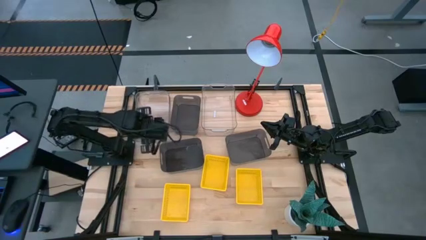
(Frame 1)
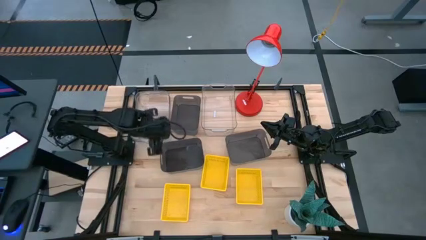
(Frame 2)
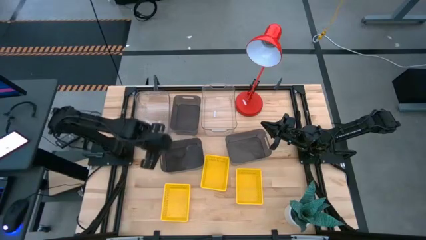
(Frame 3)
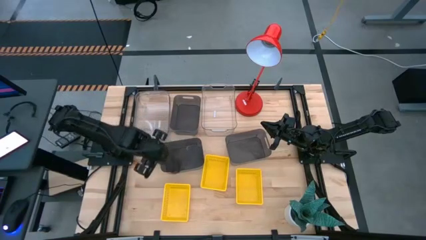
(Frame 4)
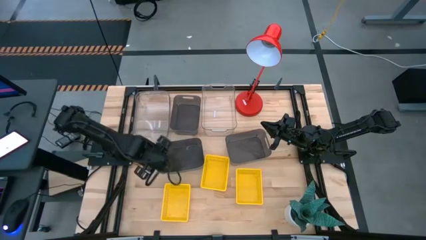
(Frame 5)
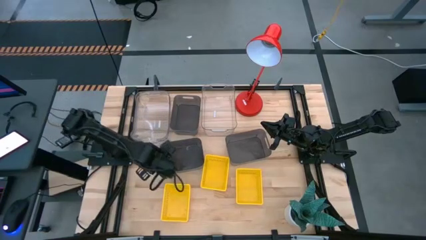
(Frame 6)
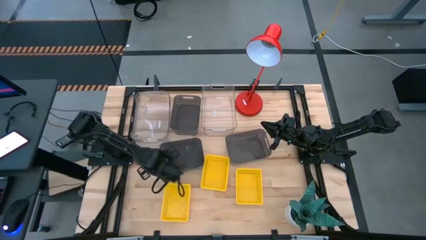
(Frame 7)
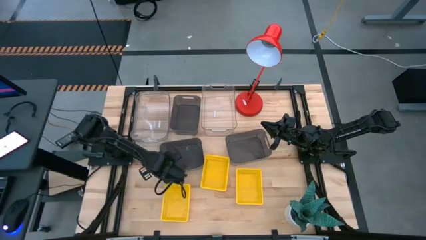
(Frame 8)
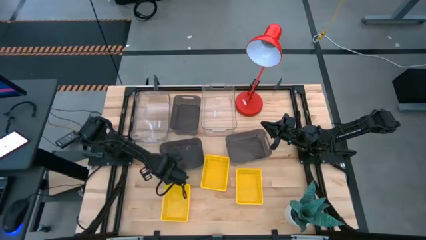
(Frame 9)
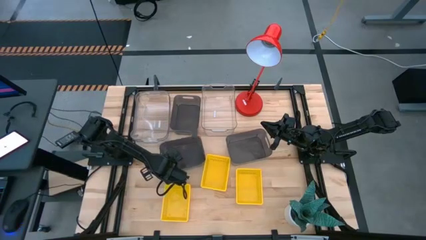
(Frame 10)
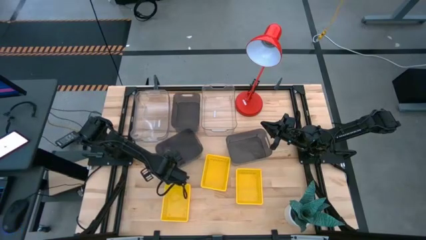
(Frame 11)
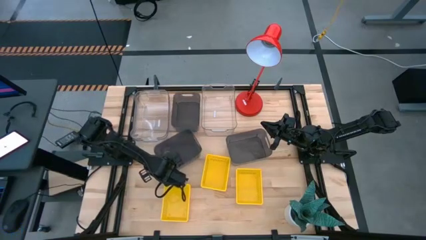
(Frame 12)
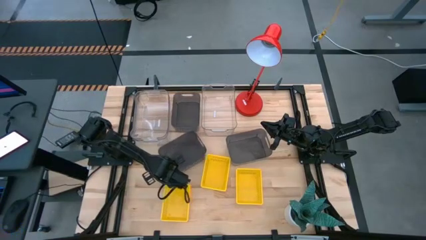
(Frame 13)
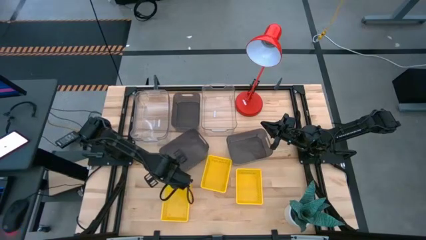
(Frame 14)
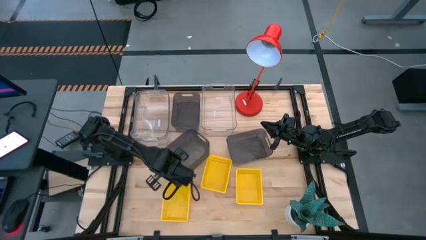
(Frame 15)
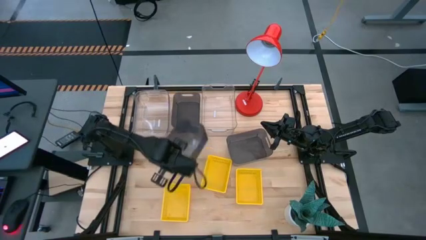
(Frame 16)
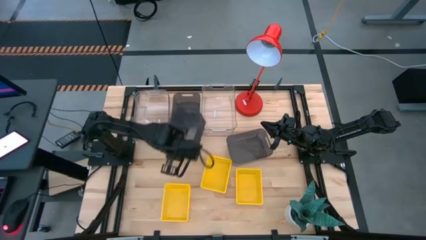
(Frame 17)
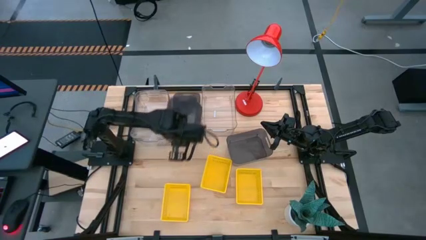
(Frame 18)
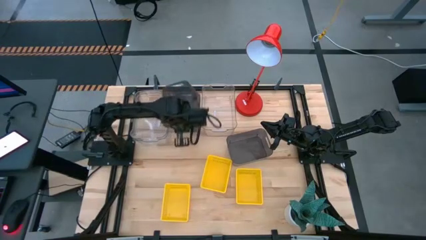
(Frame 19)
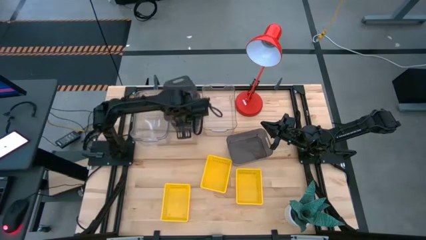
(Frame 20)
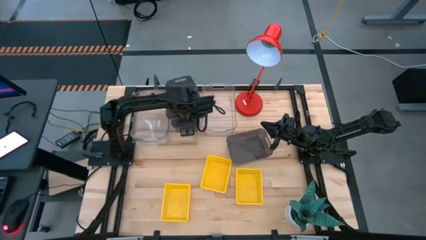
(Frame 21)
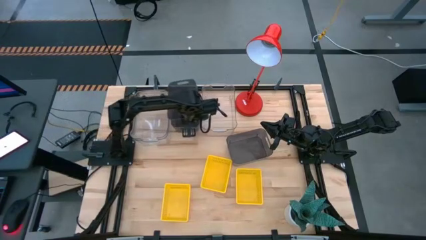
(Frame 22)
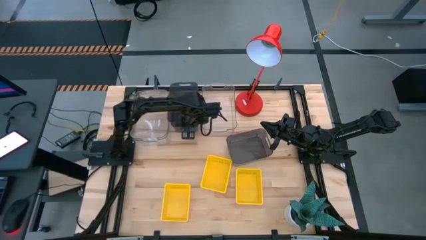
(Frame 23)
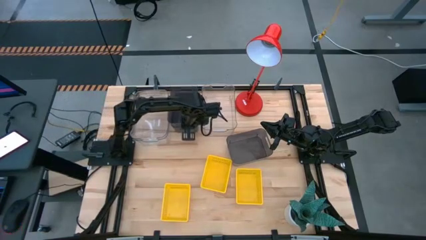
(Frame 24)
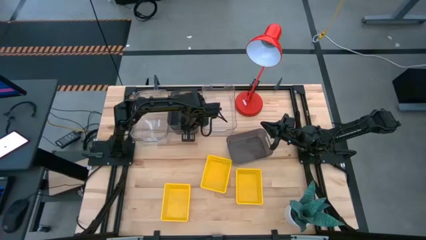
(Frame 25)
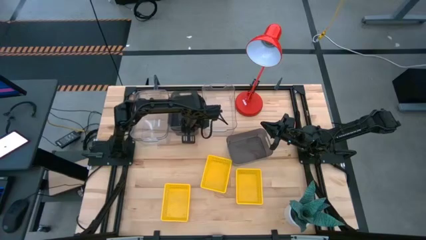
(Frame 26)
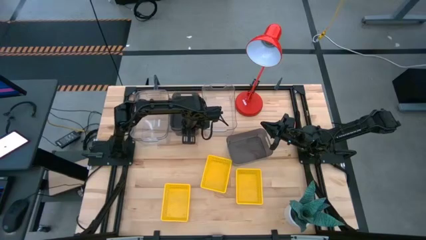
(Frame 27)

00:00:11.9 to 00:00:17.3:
Stack the bottom left black bin on top of the top black bin

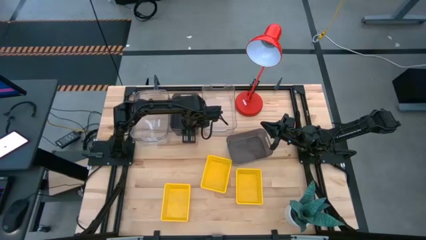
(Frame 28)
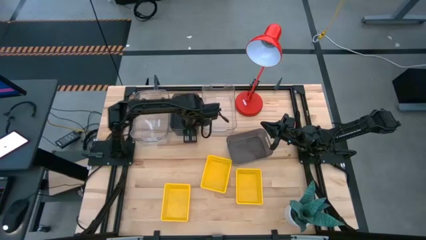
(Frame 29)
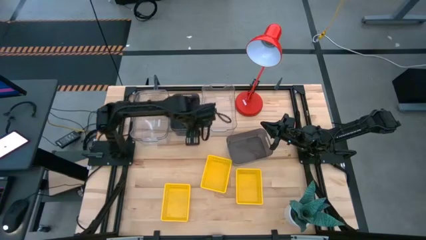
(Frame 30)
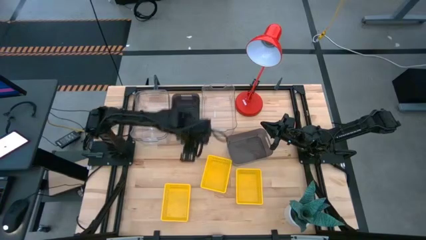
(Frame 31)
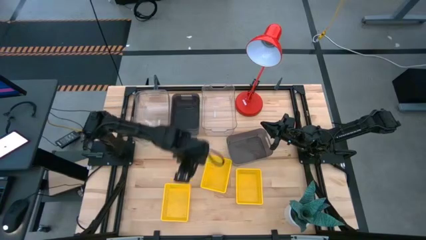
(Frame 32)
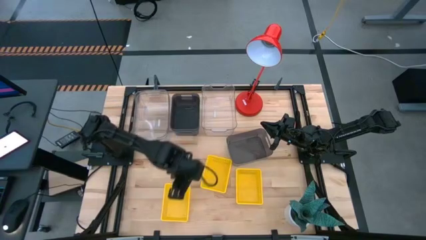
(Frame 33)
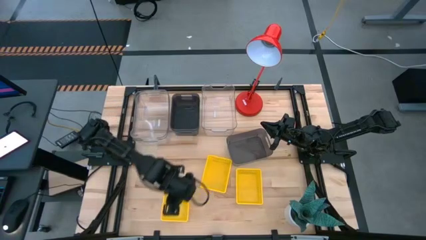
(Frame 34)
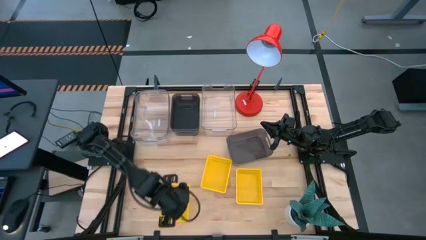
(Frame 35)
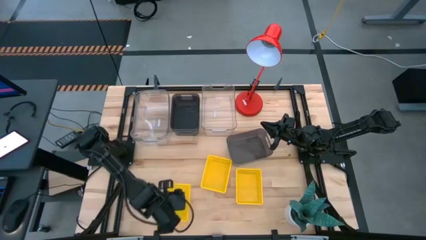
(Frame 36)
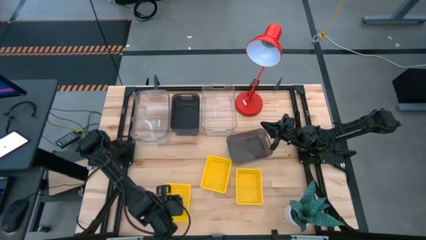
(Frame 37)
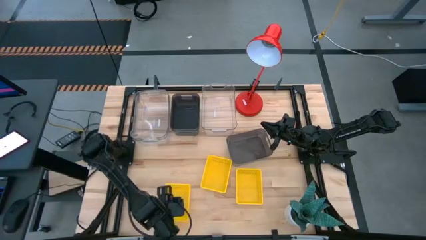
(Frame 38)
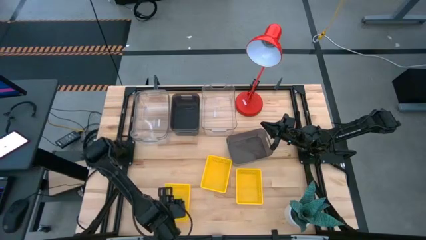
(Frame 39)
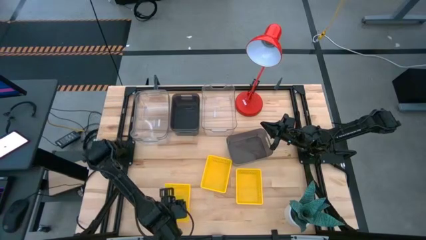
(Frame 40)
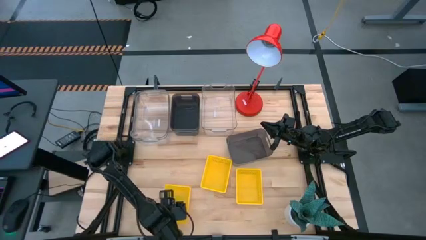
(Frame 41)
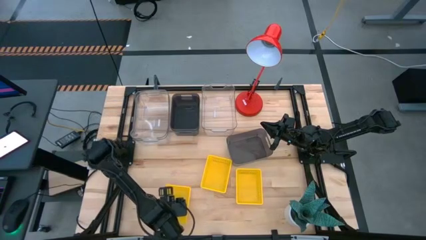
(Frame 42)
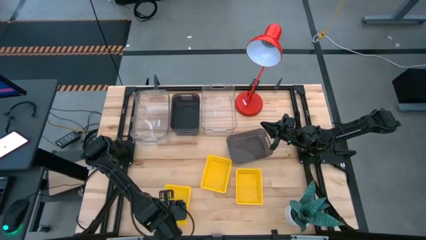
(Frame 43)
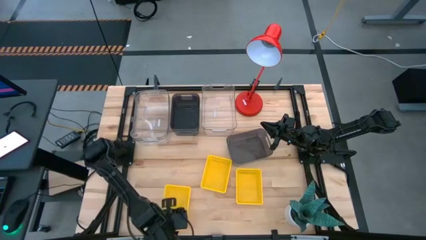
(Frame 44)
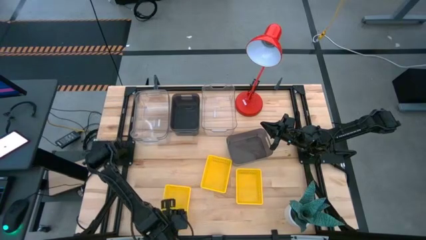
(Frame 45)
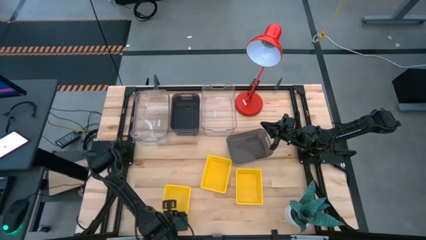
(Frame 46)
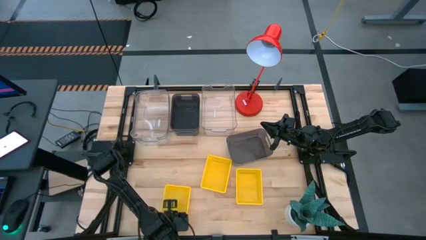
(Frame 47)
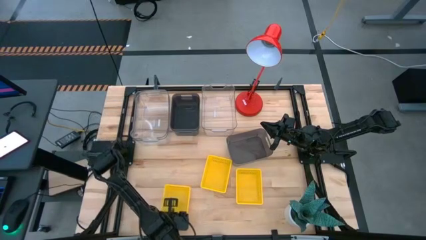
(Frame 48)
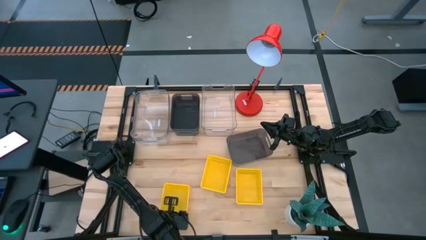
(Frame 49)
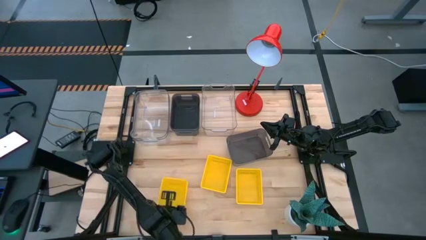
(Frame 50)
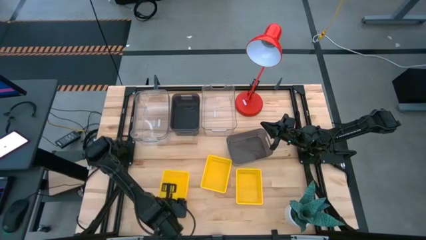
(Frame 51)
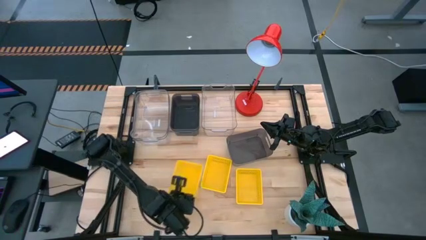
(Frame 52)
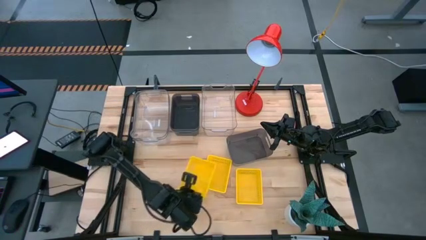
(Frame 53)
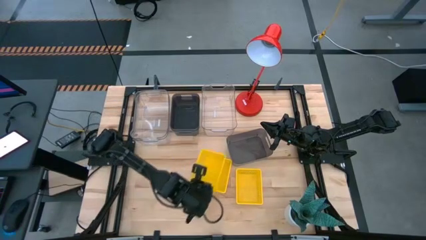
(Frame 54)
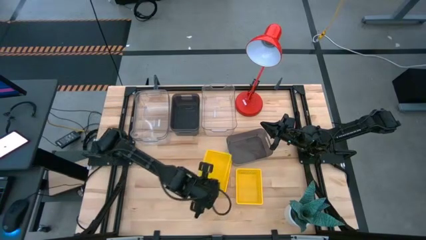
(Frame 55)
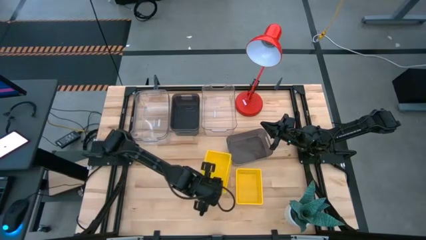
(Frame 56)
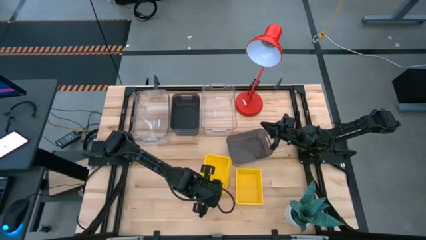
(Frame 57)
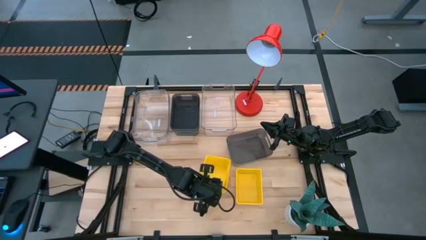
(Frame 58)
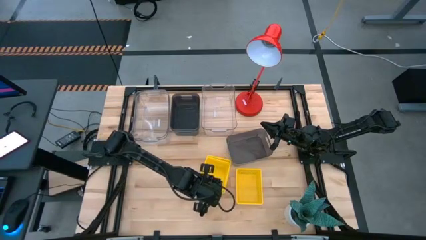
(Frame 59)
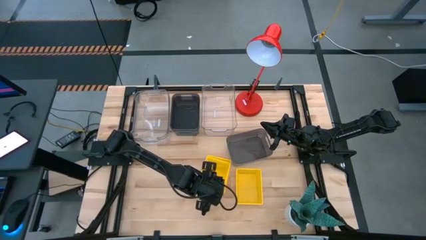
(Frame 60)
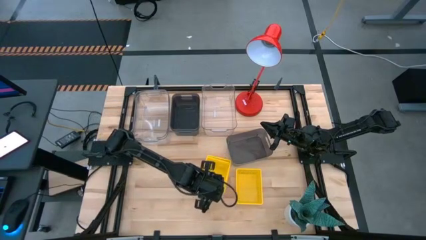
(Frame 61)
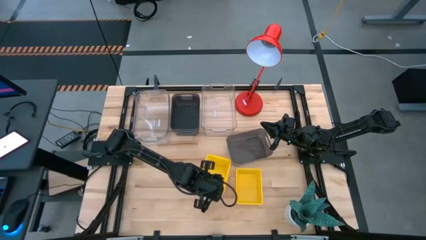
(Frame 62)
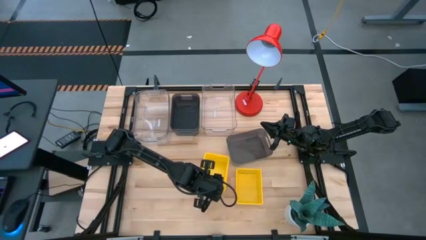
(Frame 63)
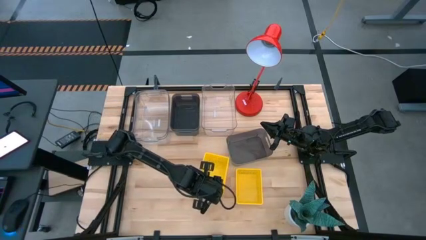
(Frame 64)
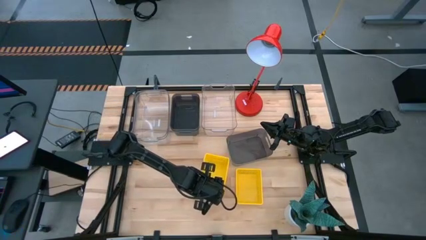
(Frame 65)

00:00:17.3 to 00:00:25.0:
Stack the left yellow bin on top of the middle yellow bin

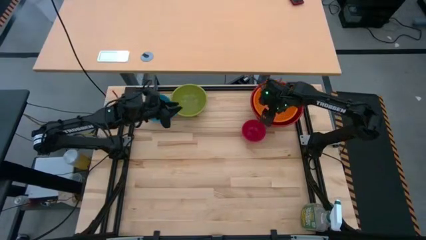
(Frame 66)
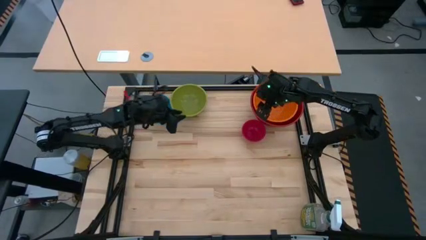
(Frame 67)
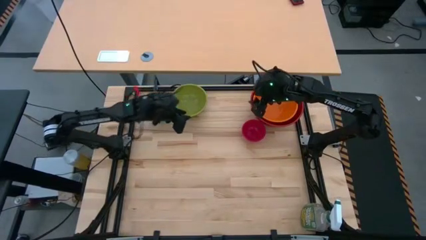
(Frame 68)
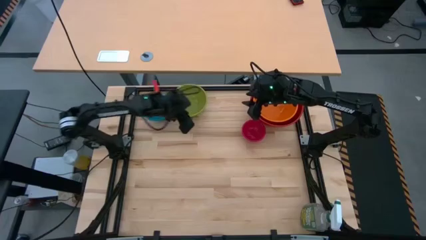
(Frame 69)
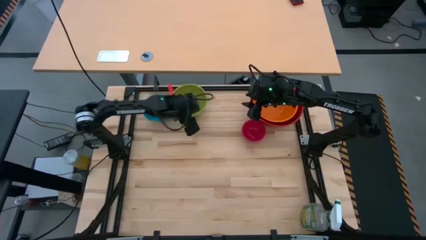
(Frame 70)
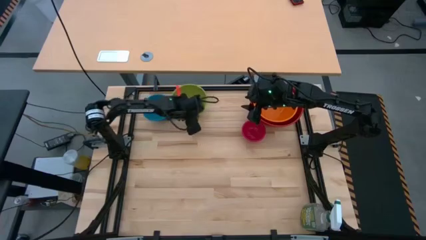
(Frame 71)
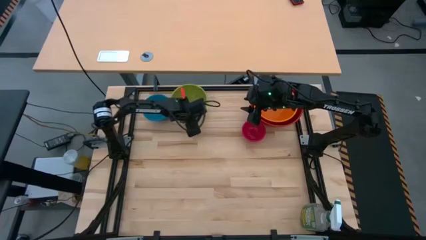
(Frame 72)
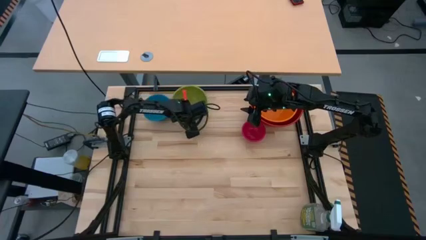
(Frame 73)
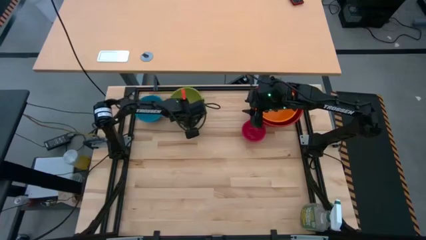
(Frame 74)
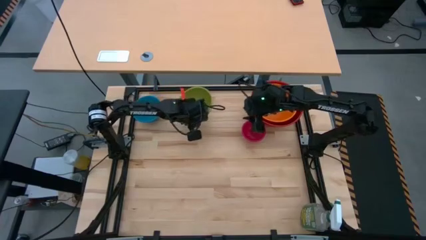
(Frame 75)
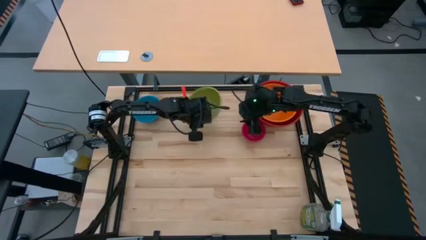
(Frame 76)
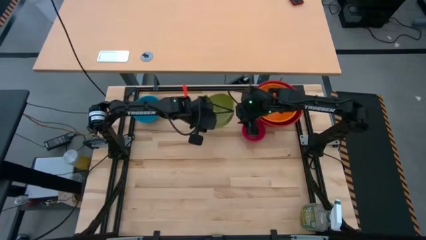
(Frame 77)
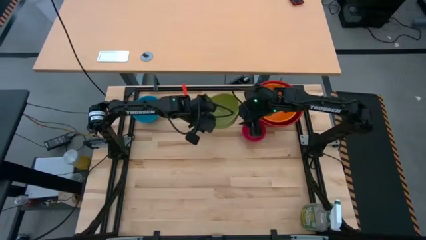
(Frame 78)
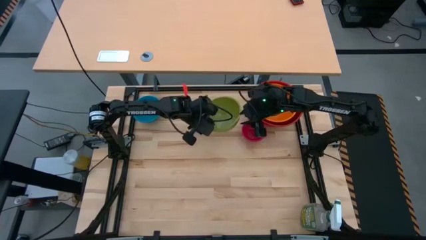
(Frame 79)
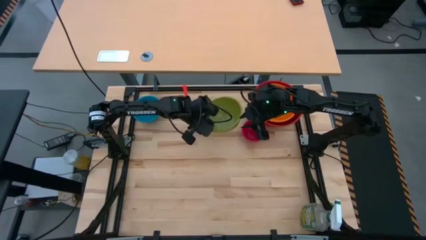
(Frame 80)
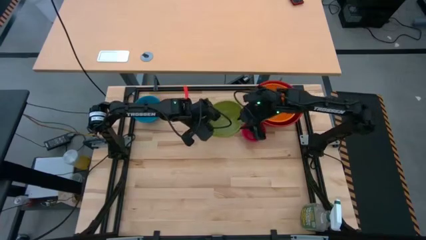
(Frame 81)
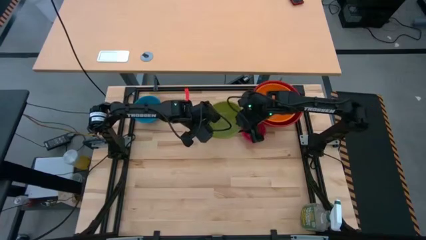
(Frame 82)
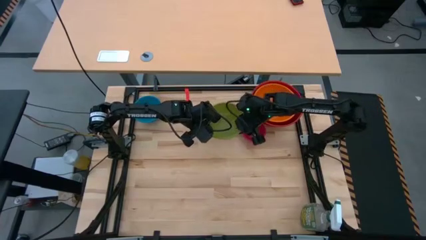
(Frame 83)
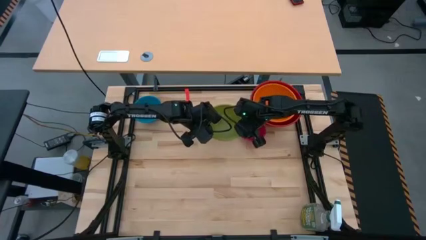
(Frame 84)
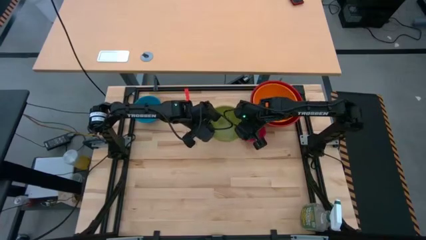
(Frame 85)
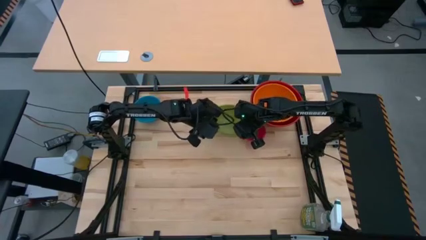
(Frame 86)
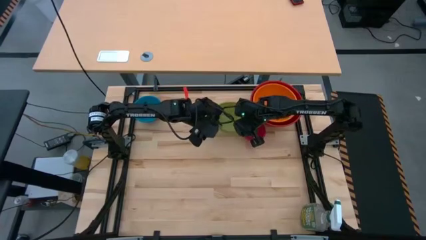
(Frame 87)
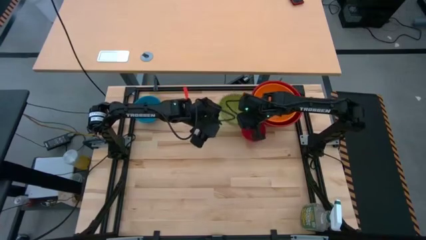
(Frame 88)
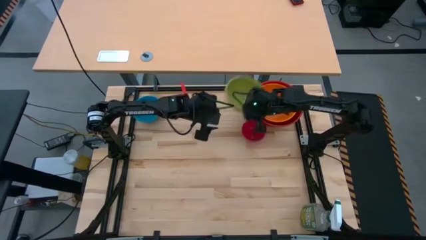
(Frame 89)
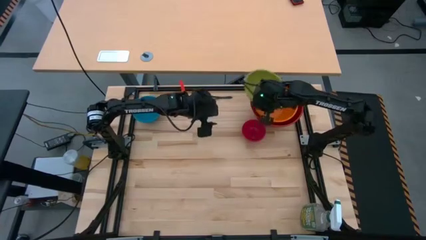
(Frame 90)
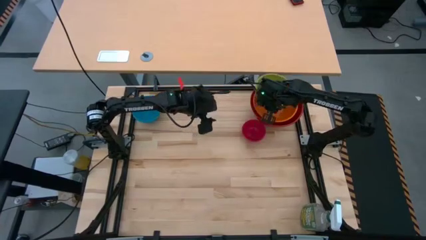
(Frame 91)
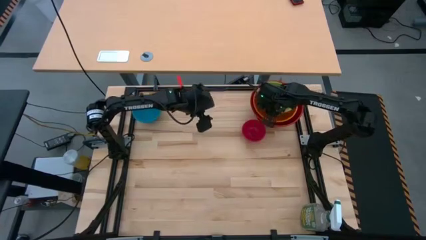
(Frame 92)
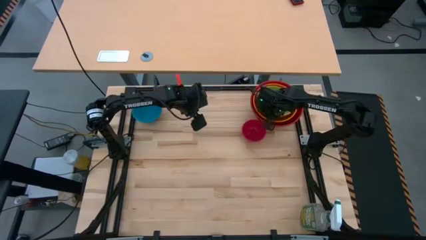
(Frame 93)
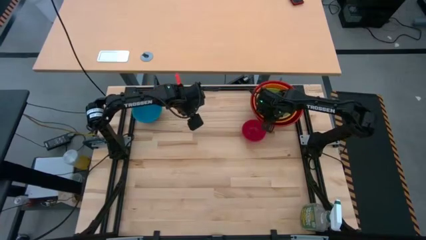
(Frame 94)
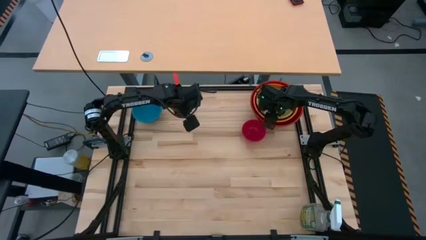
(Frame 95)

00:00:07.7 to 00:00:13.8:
Stack the green bowl into the orange bowl
